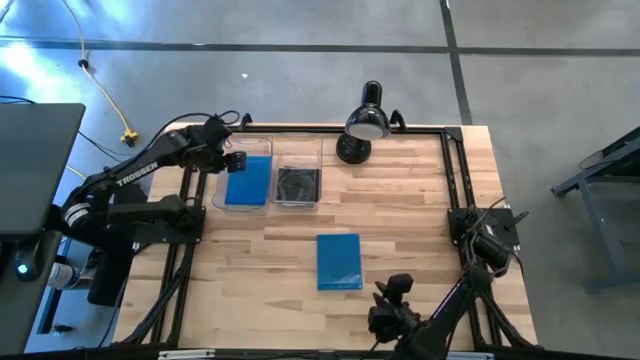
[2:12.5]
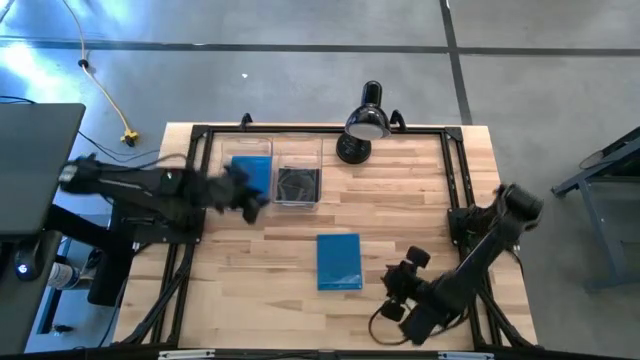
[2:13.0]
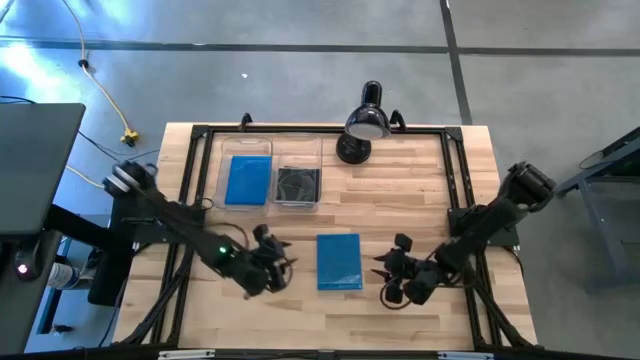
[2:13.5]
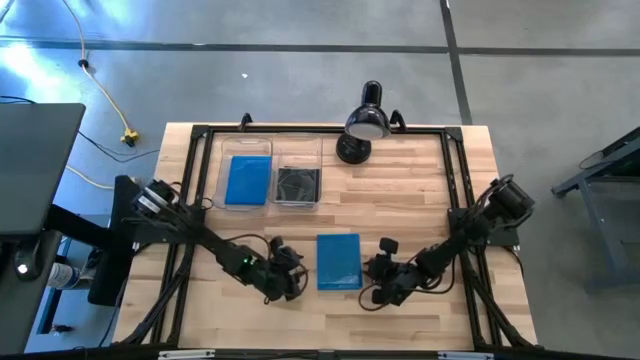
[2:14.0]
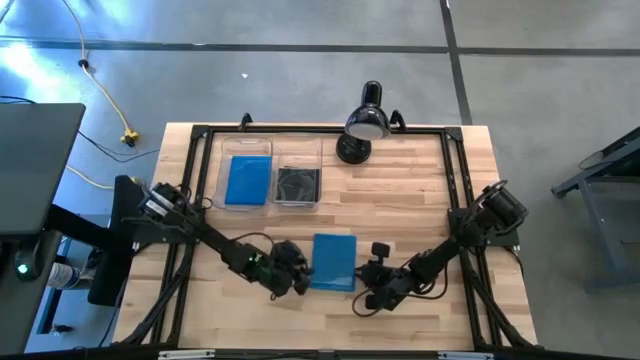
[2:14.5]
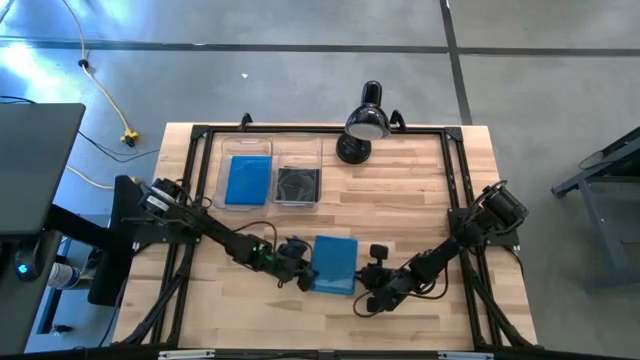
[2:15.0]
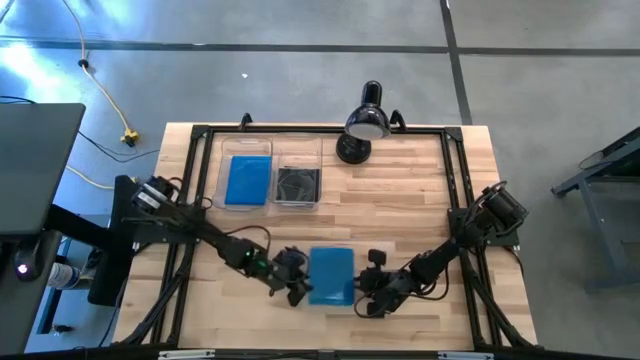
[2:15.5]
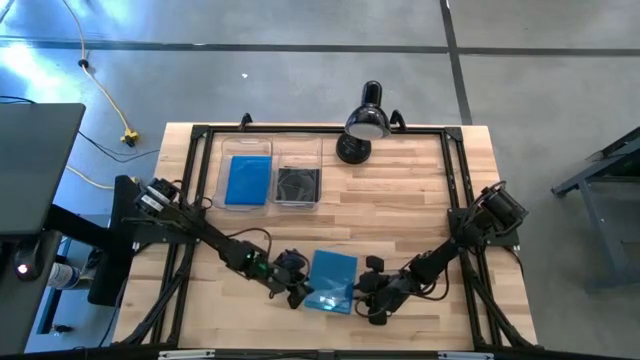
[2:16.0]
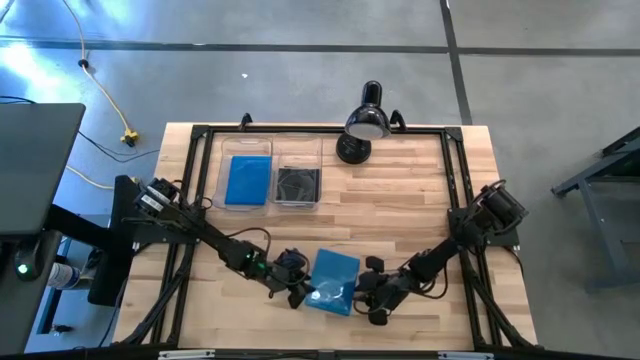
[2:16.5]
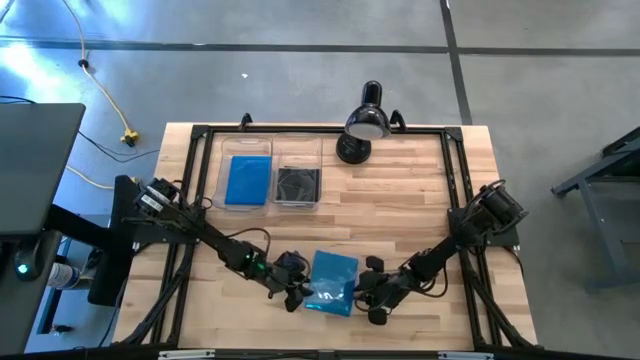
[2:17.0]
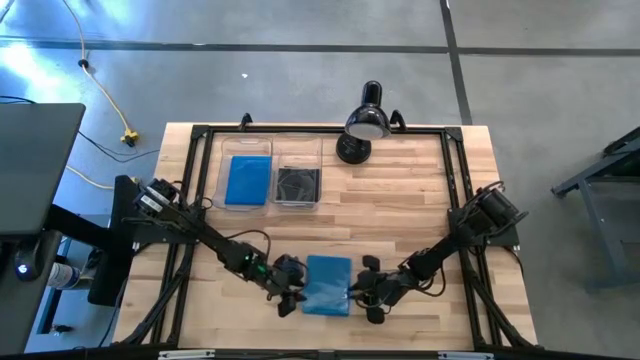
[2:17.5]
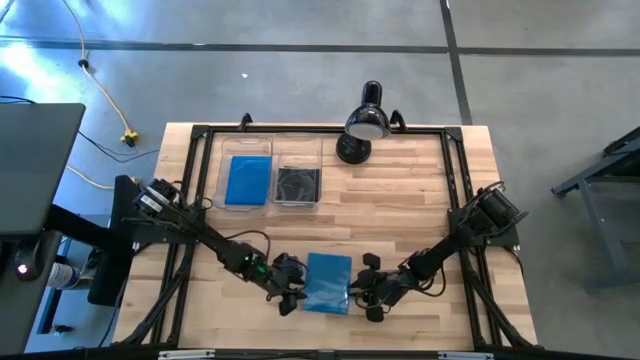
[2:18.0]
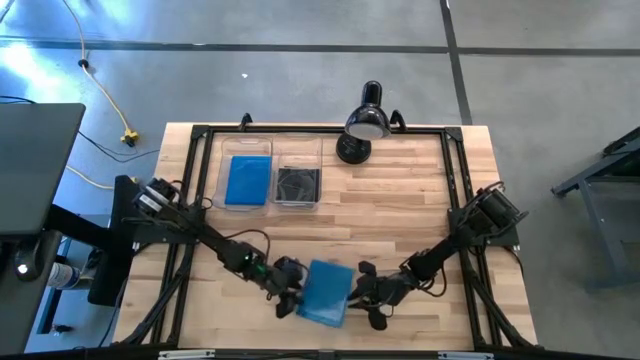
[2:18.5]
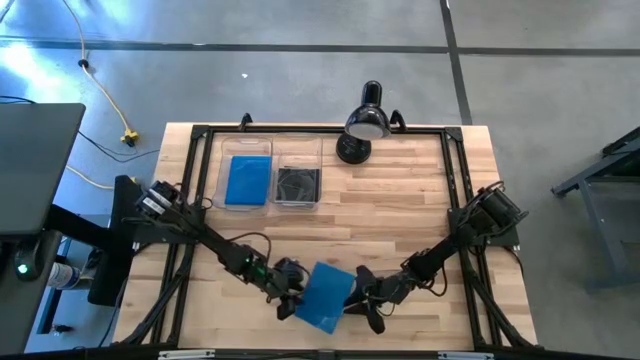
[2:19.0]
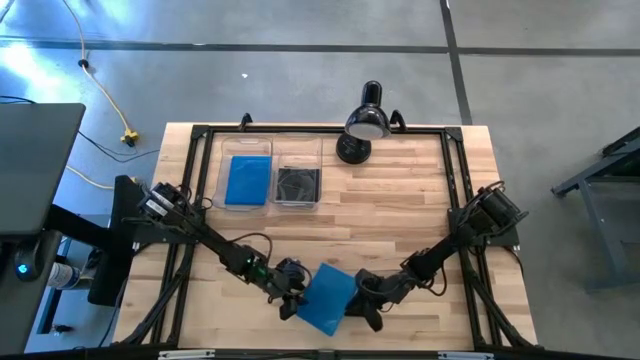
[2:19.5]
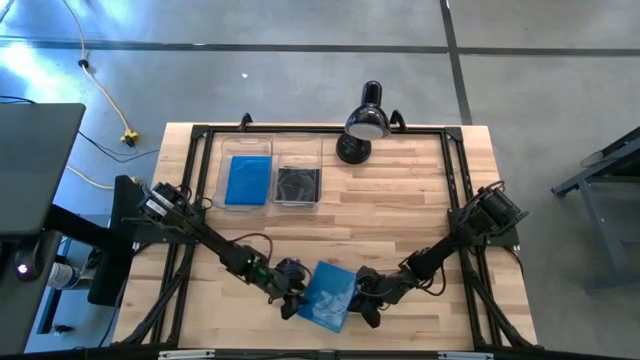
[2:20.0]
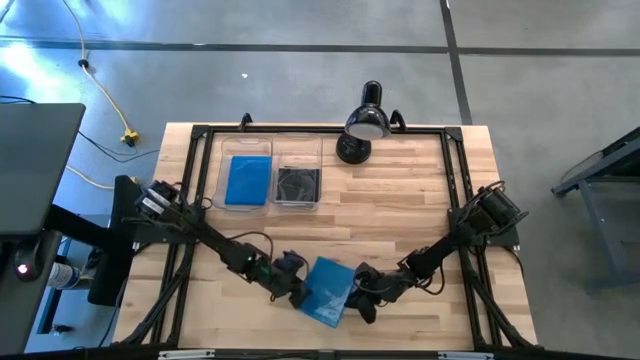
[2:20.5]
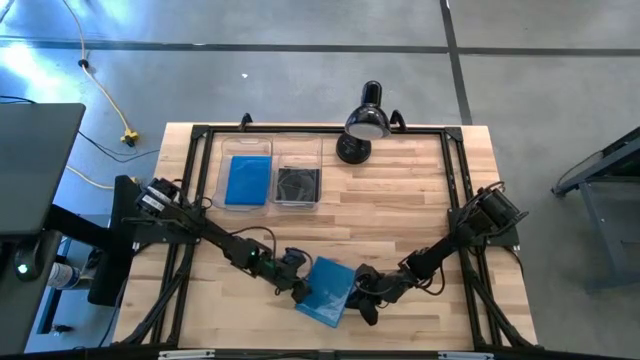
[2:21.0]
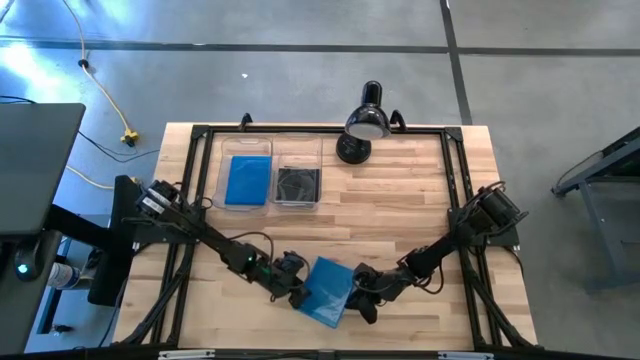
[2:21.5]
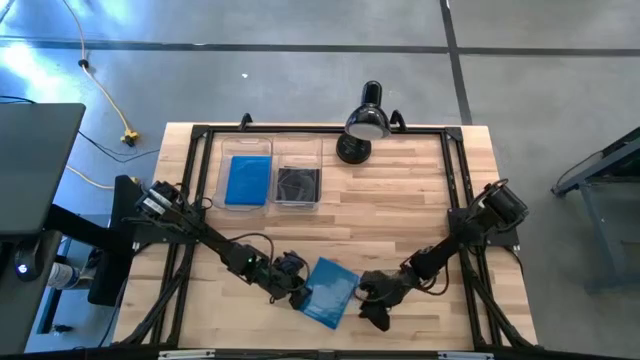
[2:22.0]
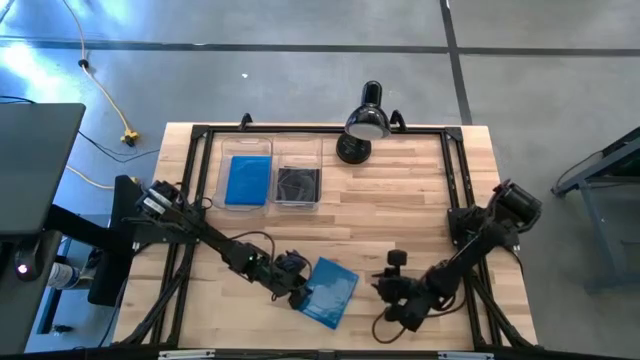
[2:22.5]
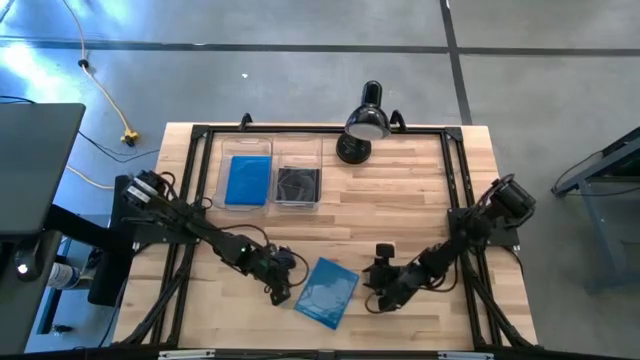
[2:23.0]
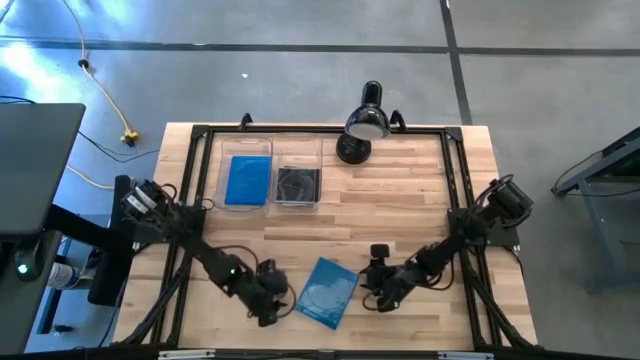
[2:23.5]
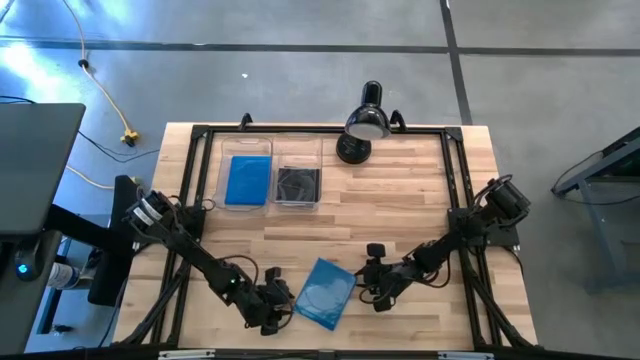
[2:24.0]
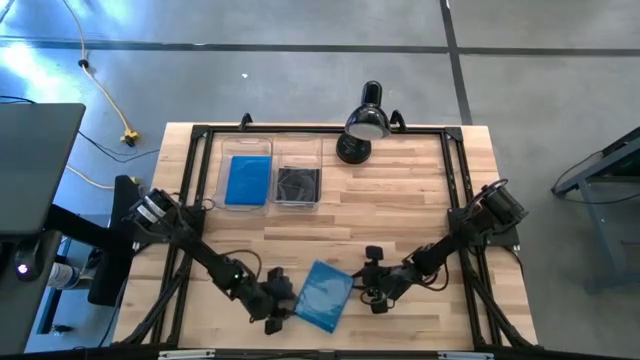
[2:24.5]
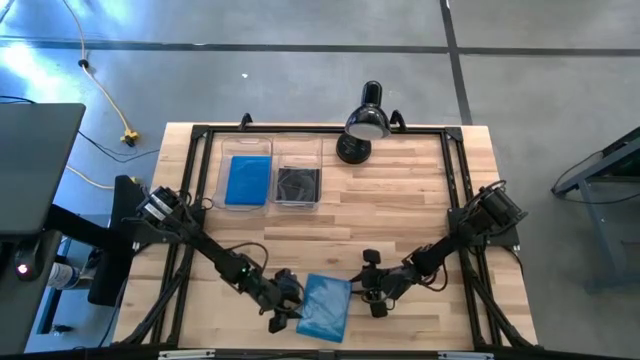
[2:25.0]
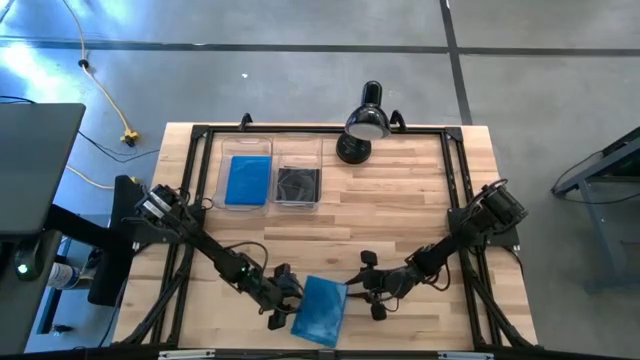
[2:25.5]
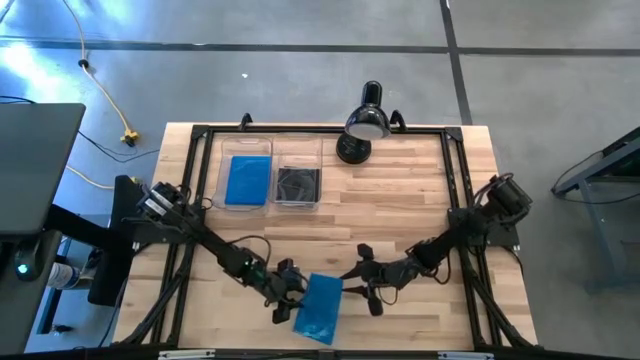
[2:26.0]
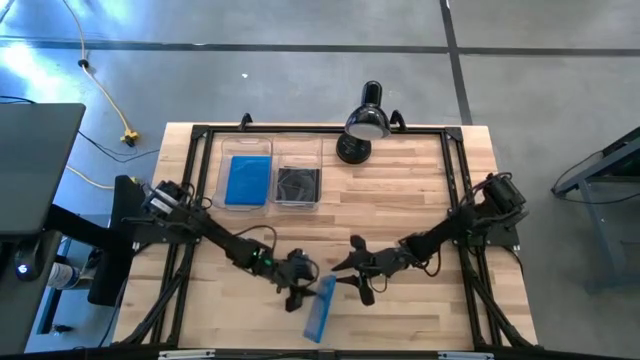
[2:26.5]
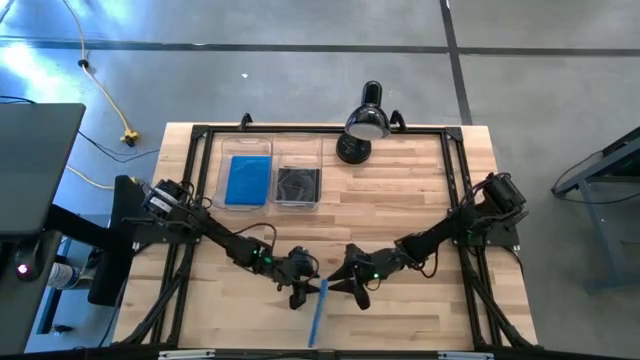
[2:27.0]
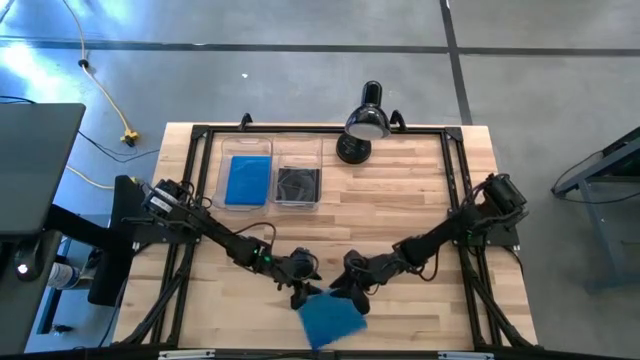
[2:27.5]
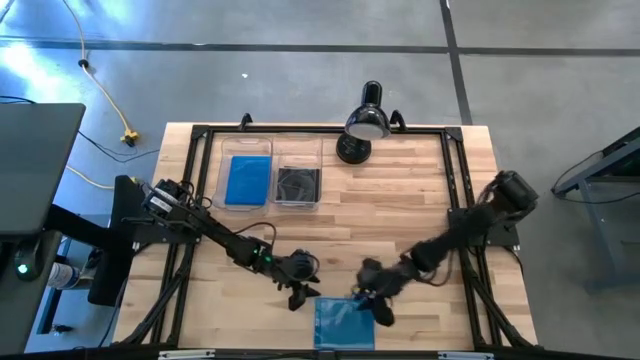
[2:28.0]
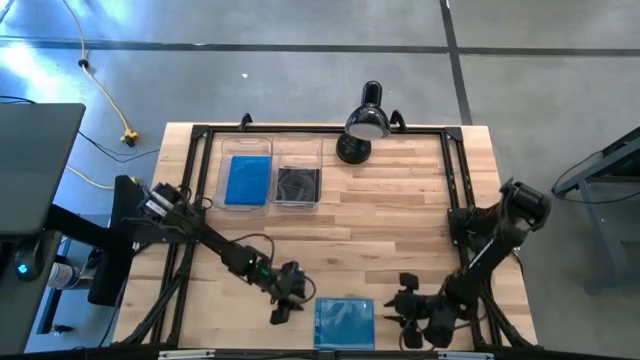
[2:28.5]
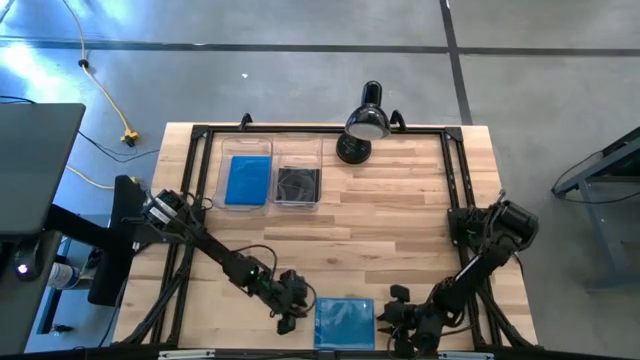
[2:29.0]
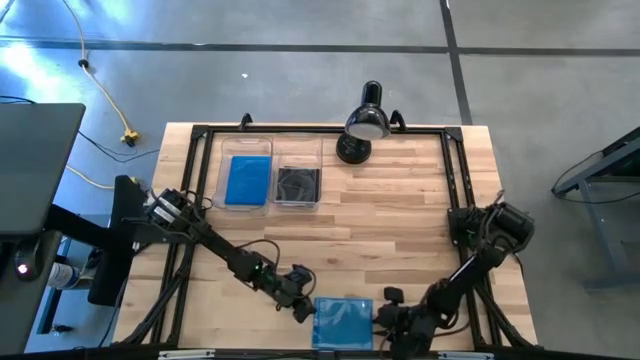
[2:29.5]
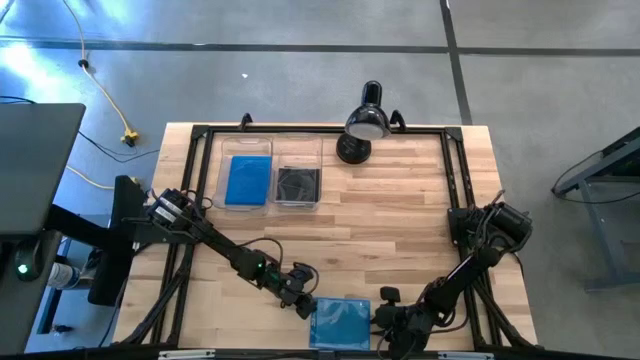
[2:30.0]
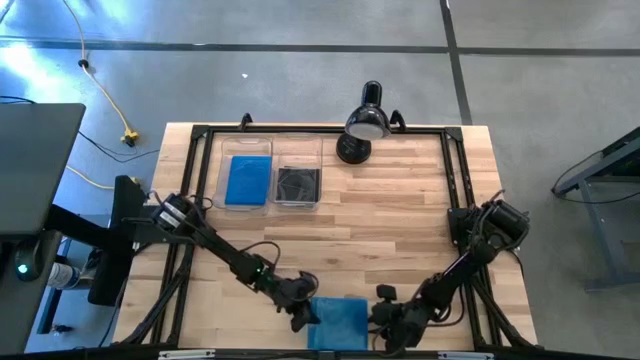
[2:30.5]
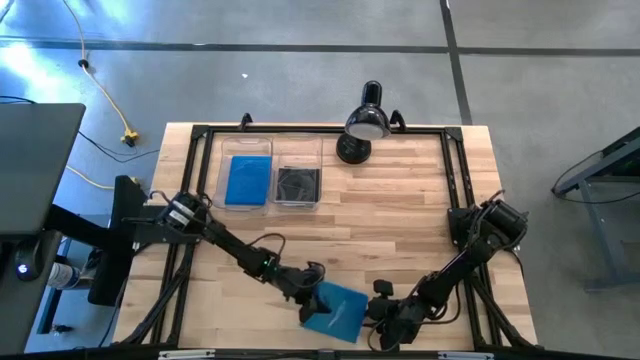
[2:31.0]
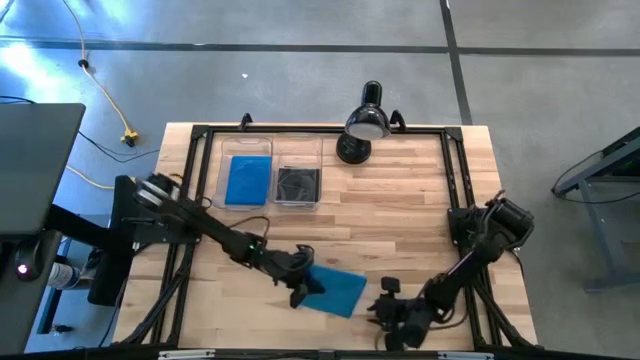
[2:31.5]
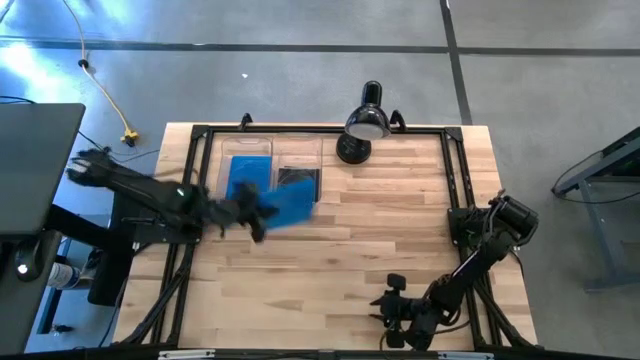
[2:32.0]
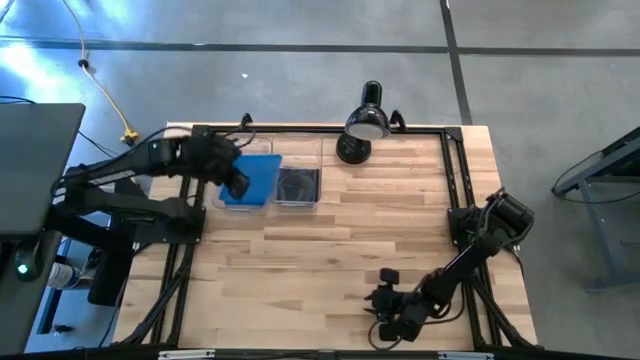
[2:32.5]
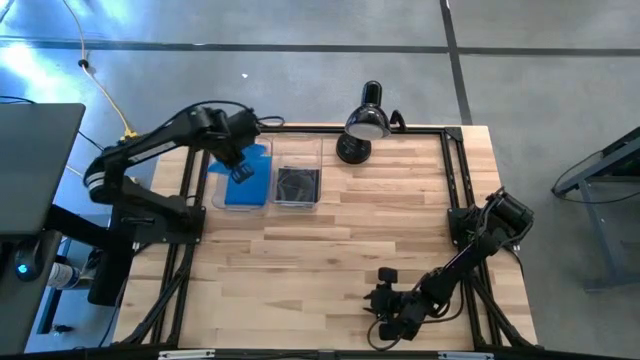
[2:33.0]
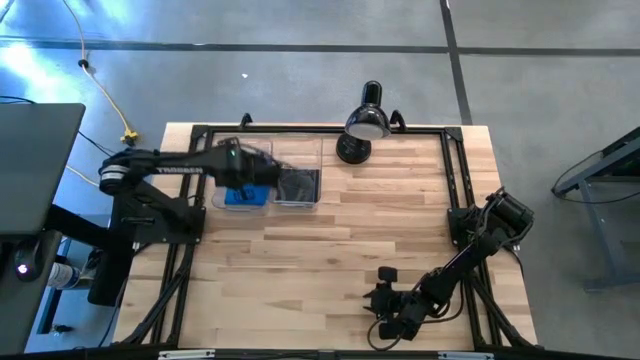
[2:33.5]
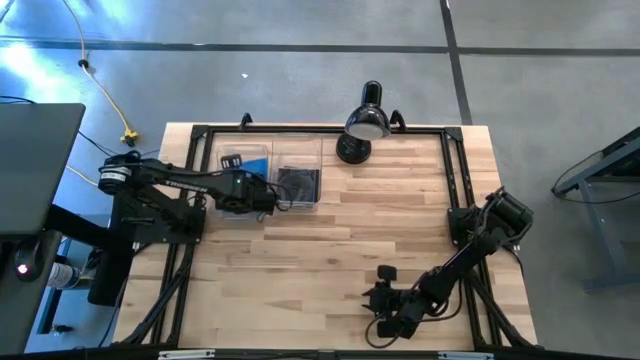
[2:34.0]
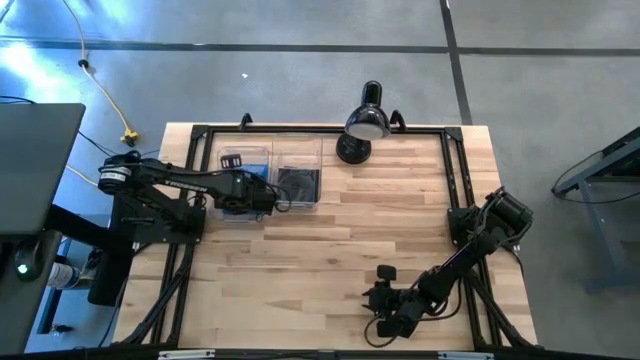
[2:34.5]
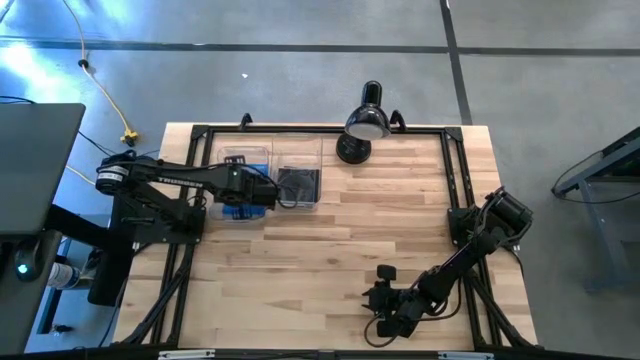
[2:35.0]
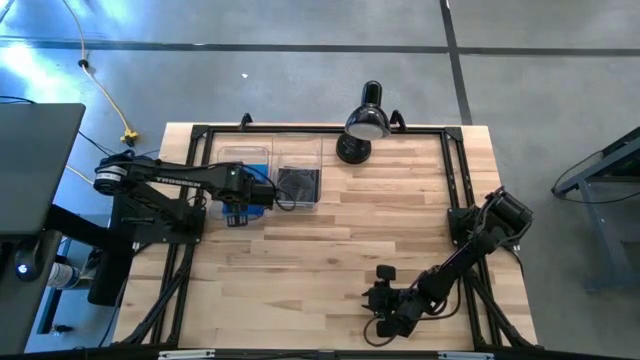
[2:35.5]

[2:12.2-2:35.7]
Task: Pick & place jewel cases by type
Put the blue CD case into the left transparent bin
